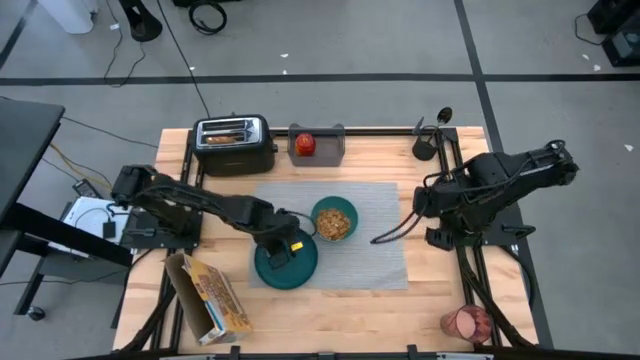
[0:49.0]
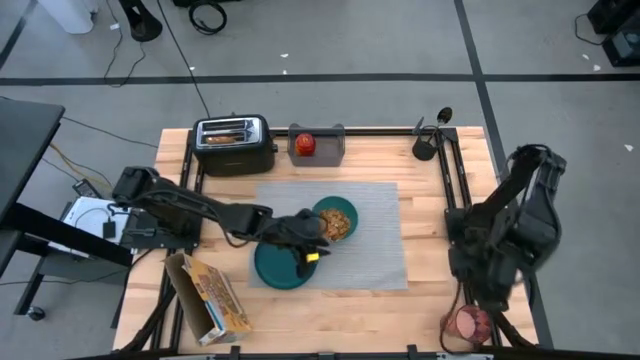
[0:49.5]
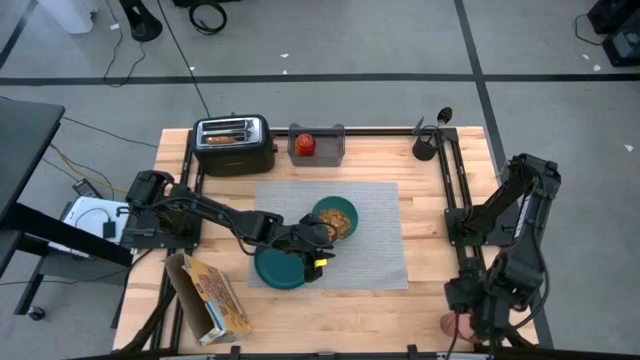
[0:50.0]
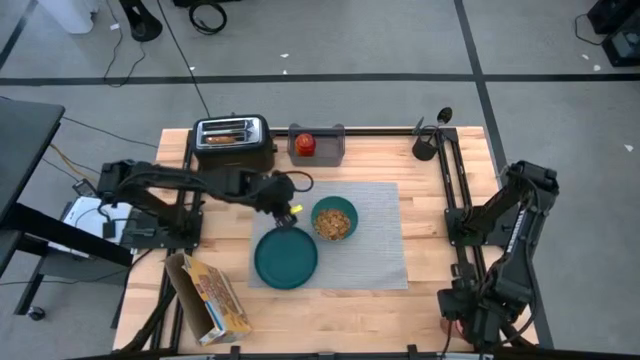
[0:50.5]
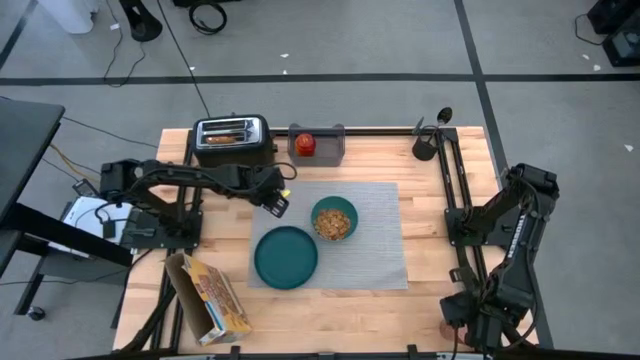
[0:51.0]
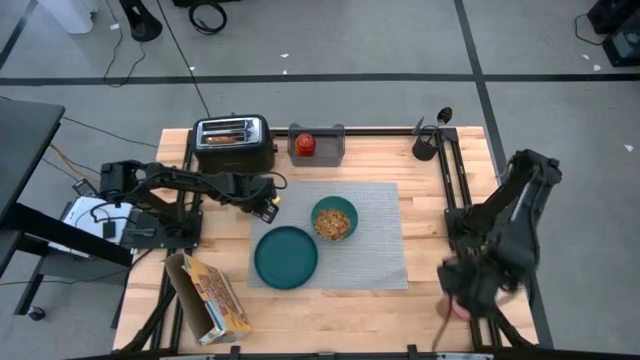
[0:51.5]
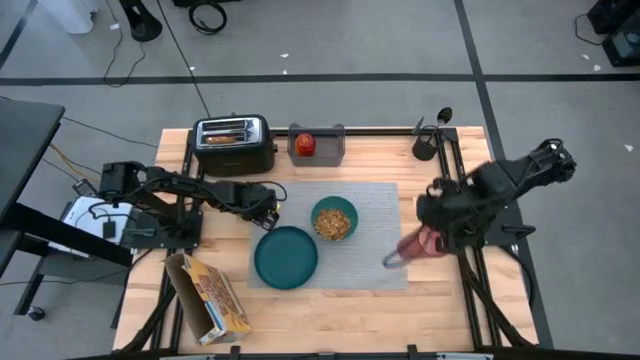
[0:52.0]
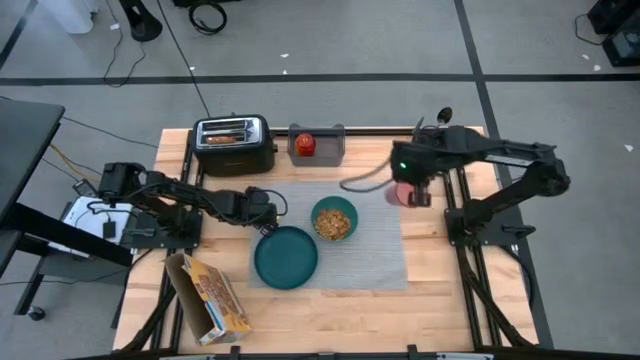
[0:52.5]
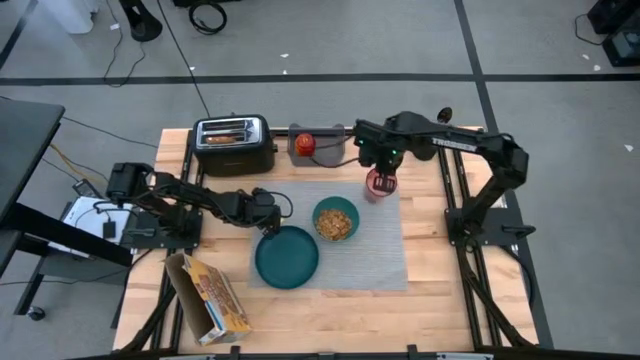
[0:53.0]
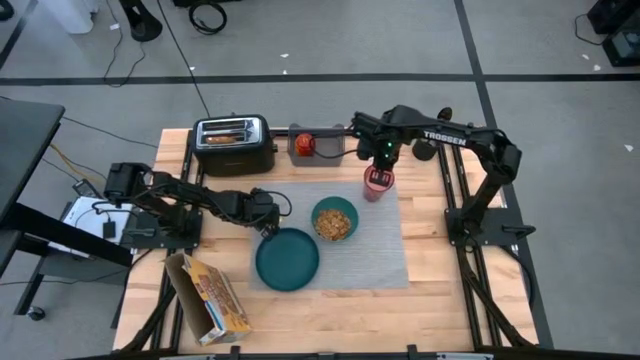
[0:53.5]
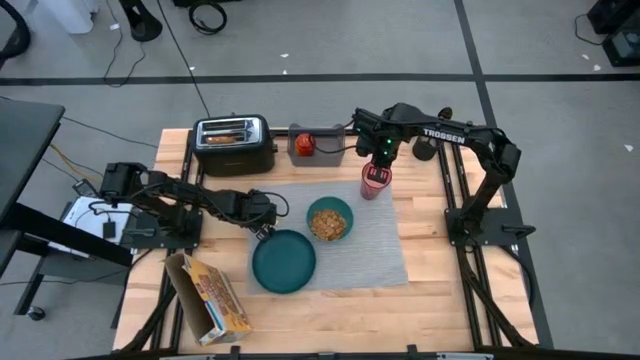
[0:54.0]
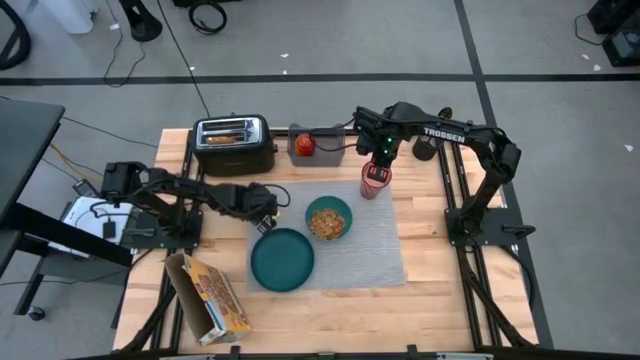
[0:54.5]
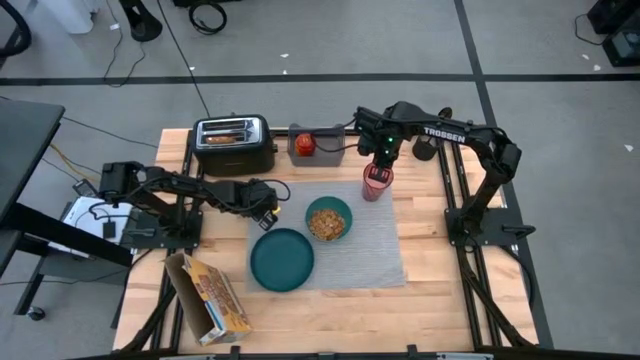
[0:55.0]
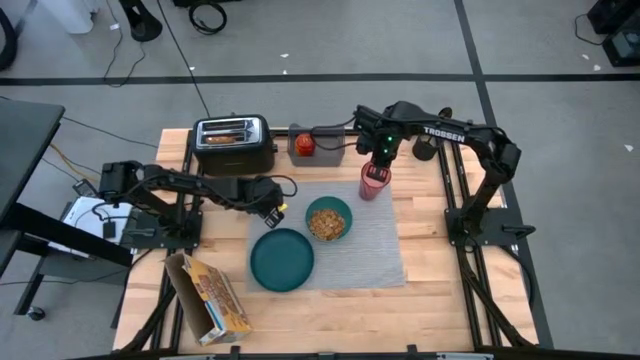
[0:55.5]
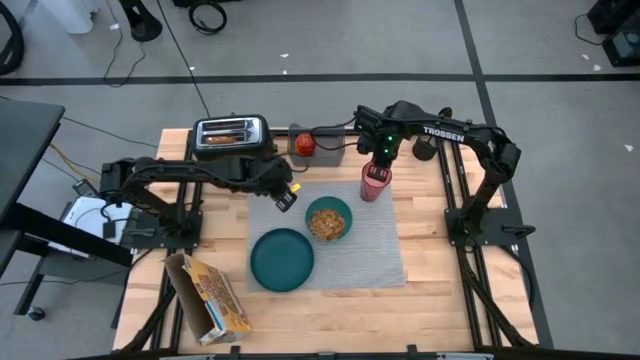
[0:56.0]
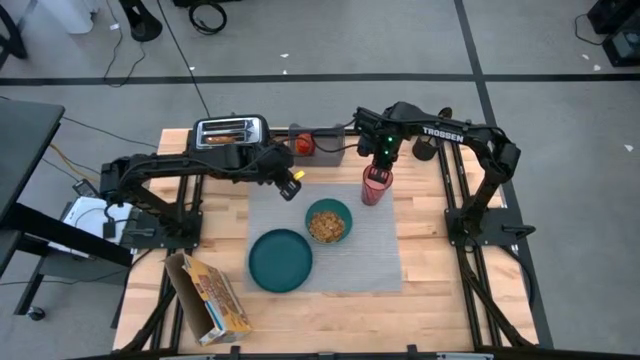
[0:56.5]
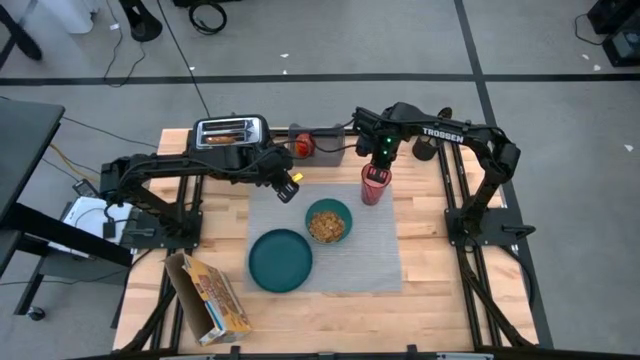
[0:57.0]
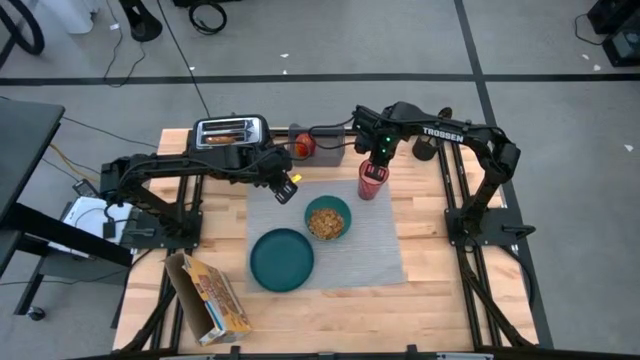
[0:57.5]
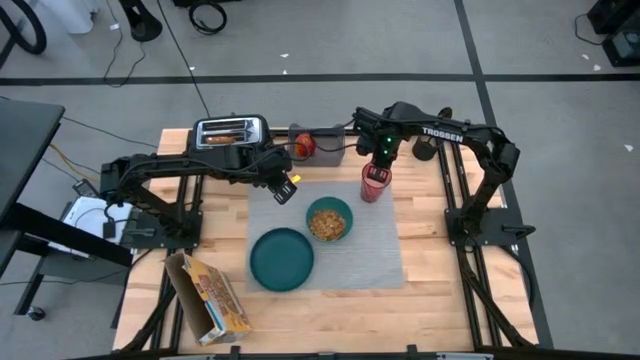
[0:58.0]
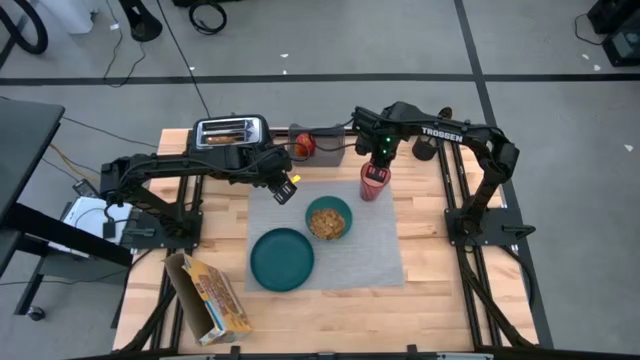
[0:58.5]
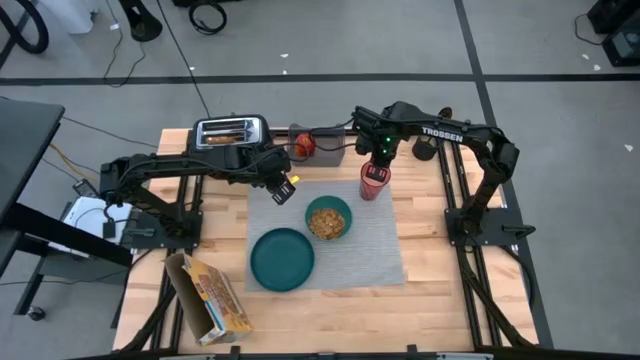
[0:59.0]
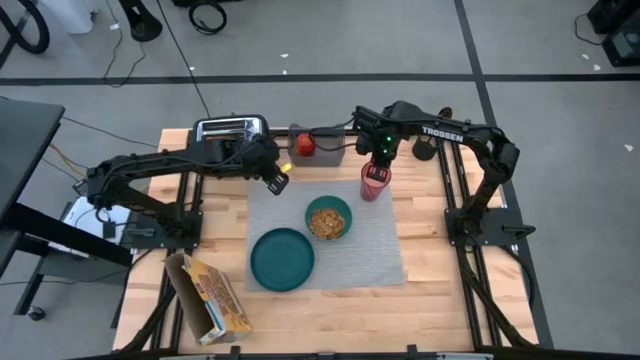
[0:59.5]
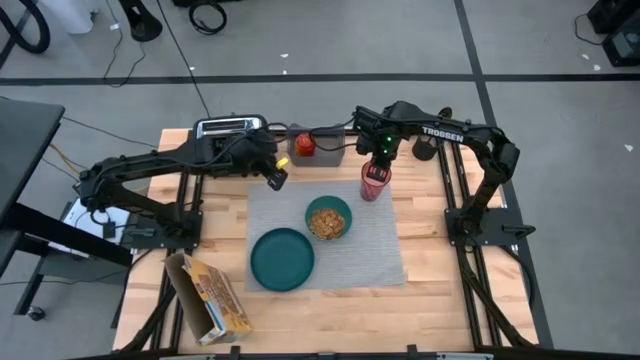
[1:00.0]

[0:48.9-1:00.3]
Task: Arrange a breakfast setting
Put the cup of milk top right of the placemat

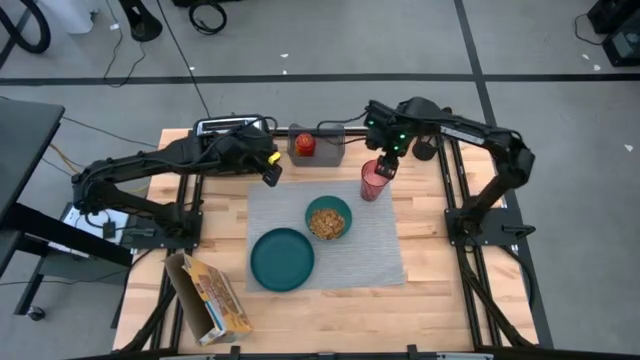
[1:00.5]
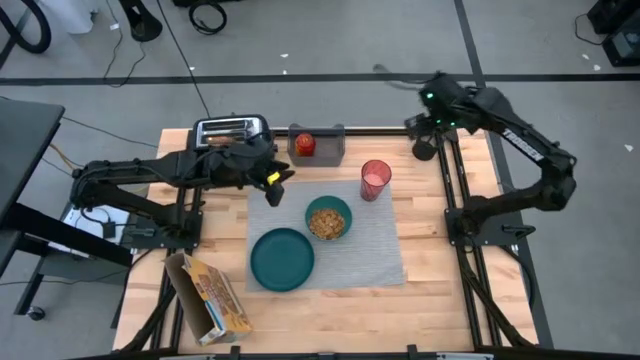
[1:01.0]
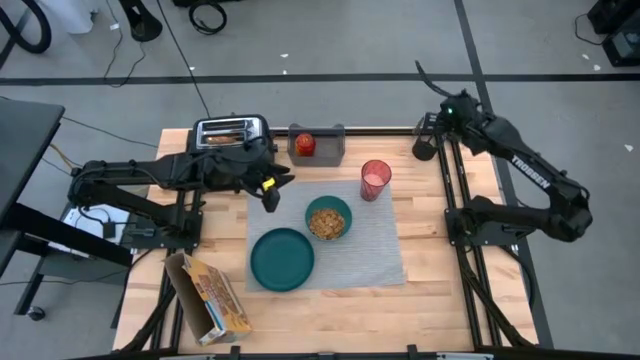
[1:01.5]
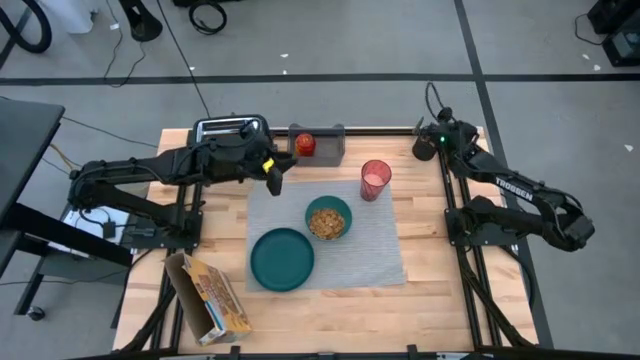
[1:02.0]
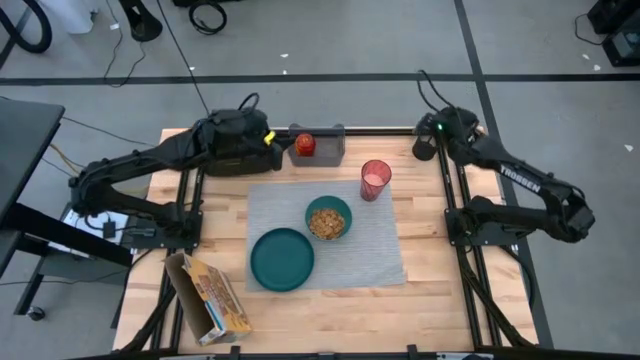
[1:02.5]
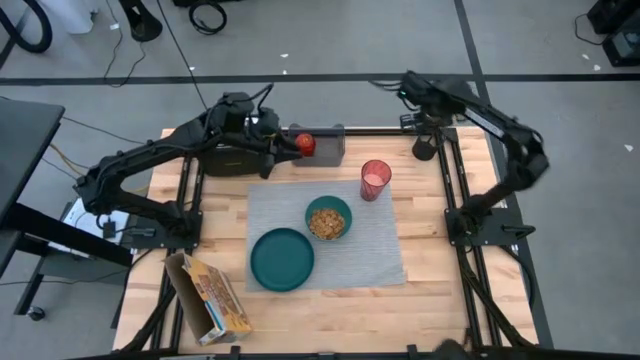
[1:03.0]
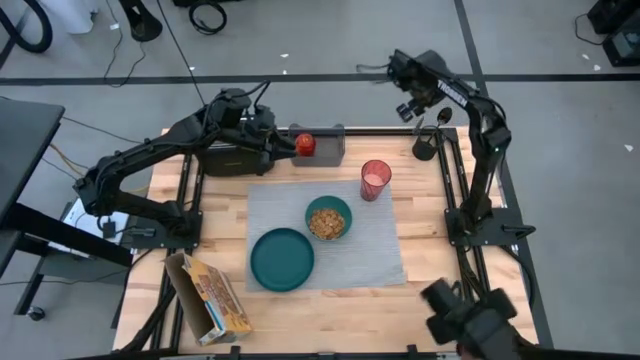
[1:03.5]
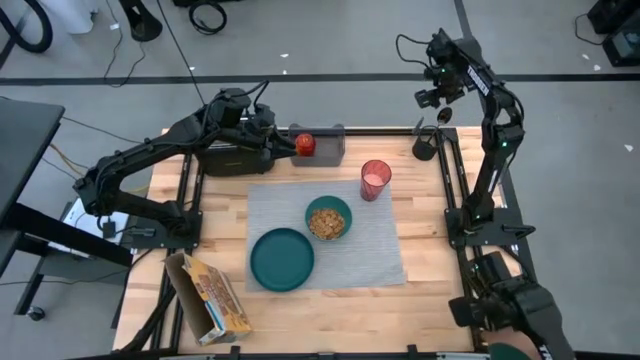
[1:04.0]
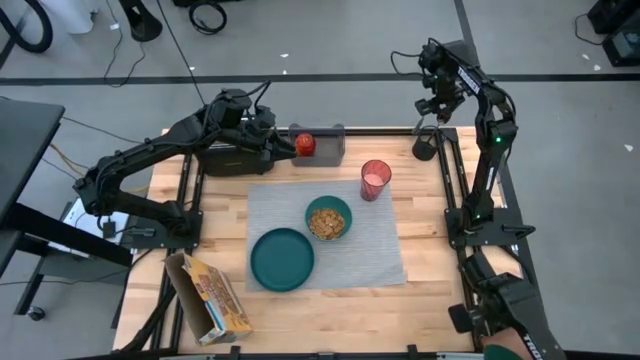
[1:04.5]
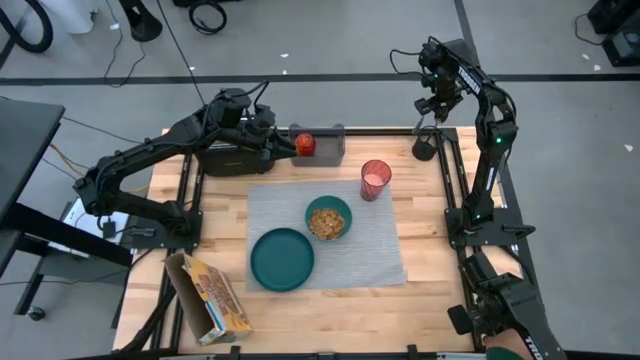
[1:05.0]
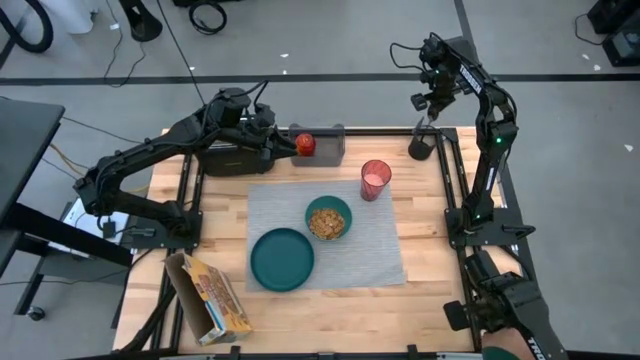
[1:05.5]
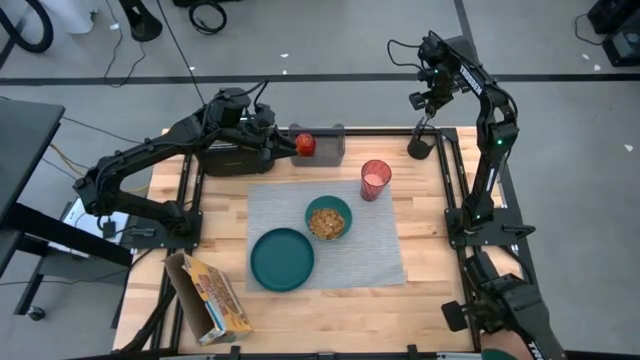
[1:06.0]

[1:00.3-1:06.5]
Put the black spoon on the bottom right of the placemat

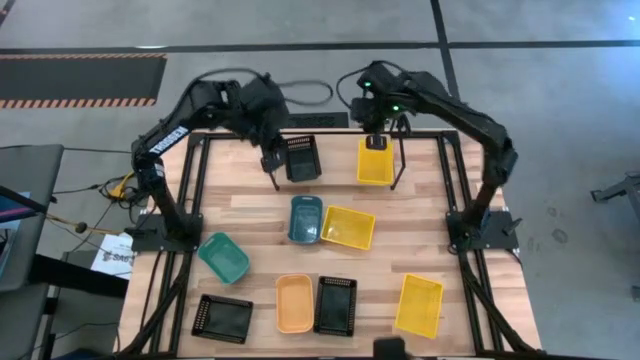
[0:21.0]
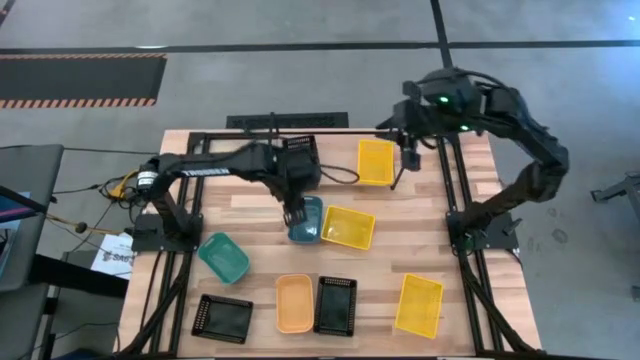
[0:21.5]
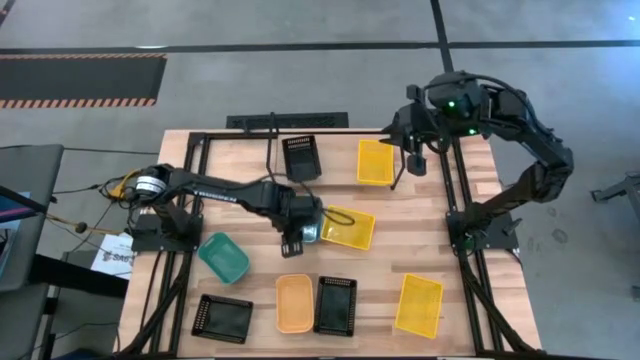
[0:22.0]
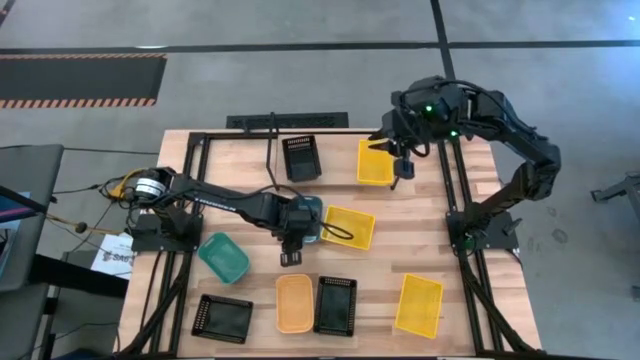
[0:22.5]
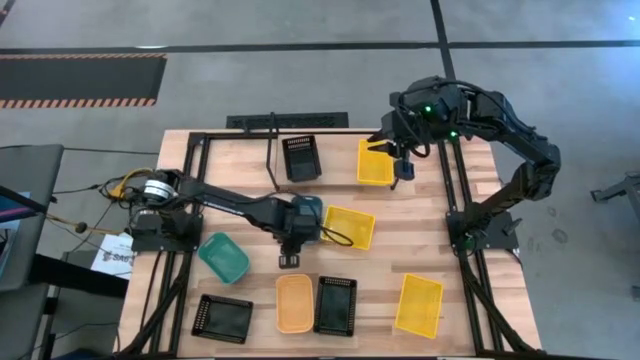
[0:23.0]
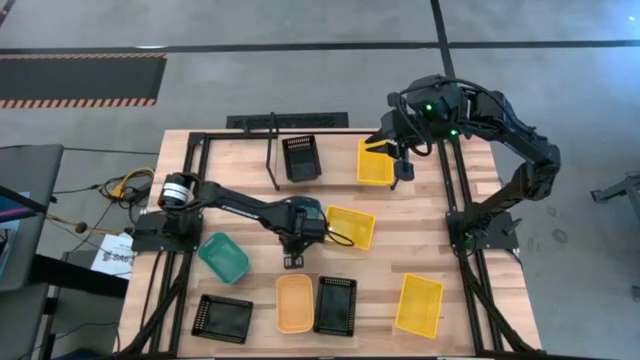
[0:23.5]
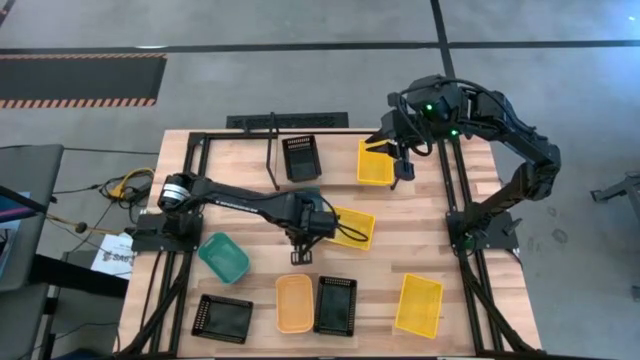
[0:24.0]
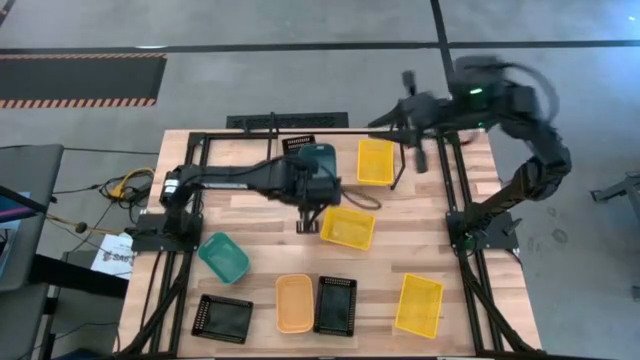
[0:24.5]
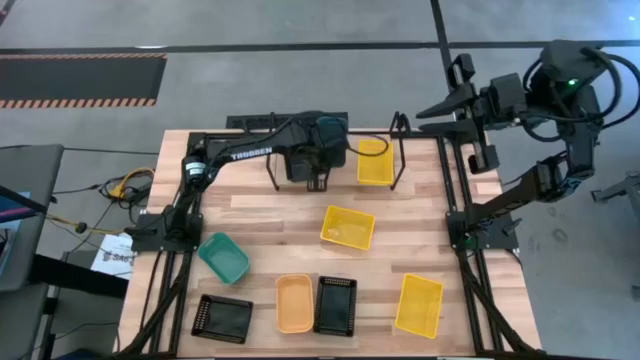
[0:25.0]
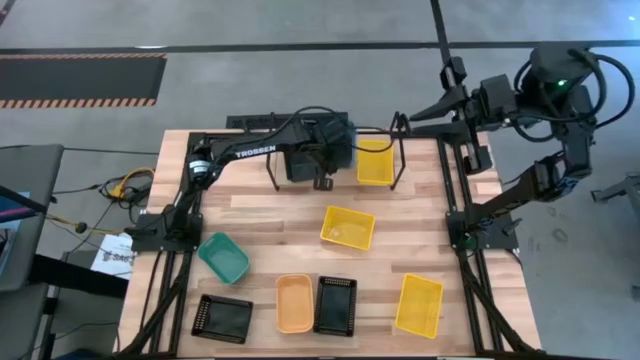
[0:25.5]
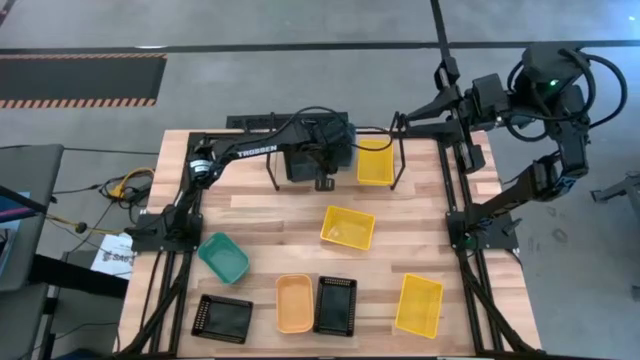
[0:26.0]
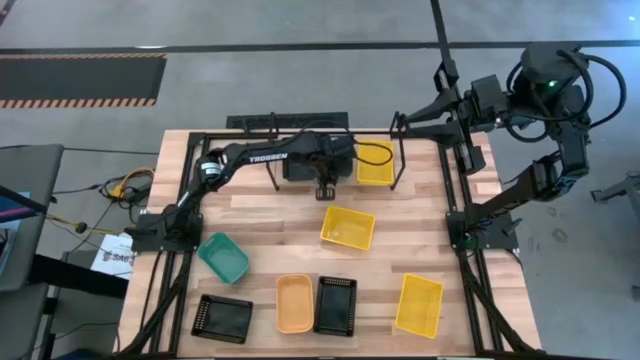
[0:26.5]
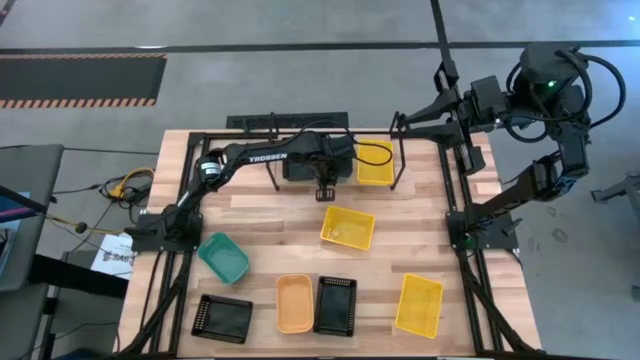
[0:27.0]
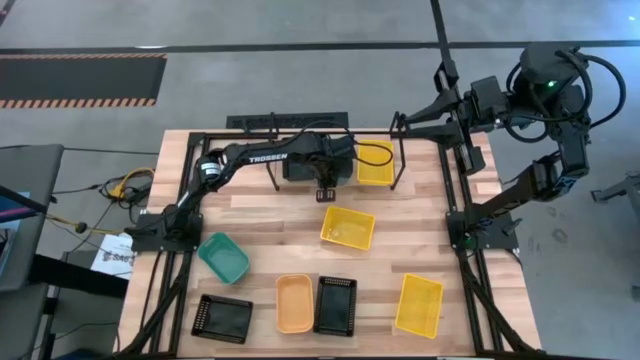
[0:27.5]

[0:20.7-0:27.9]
Task: Stack baskets on shelf by color
Put the blue bin on the shelf
